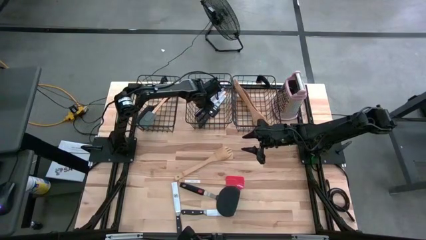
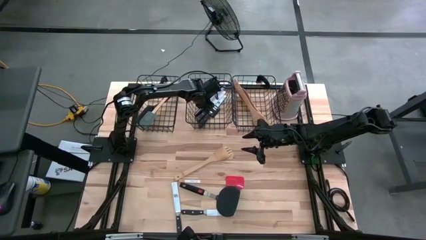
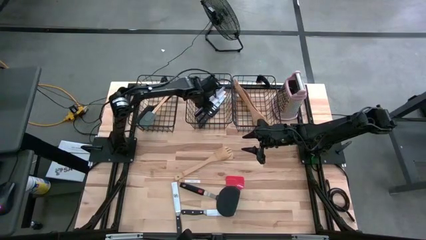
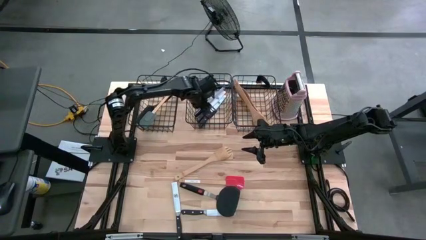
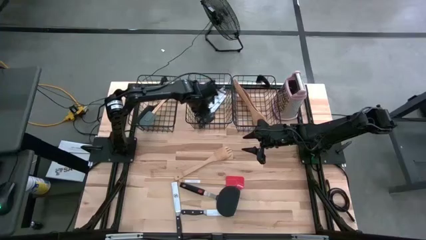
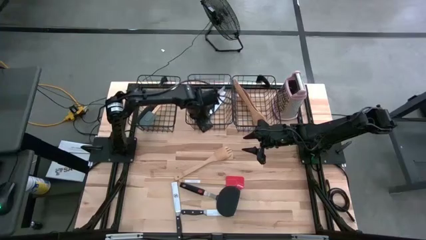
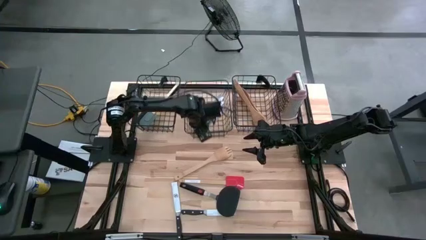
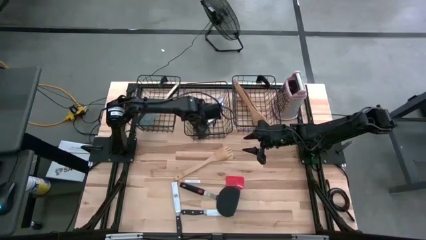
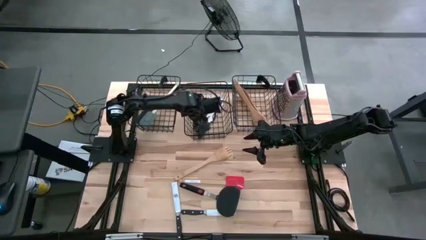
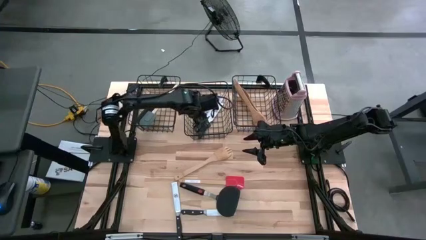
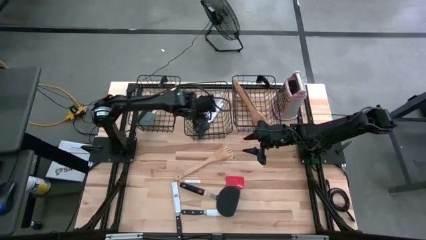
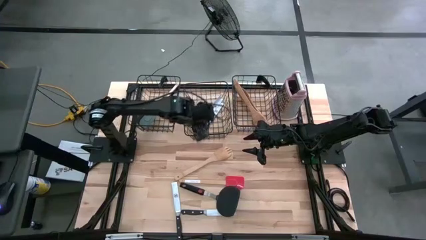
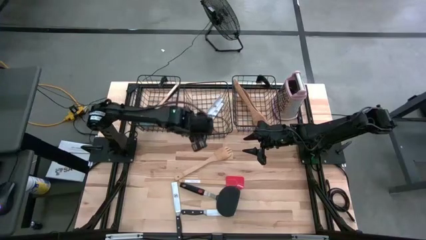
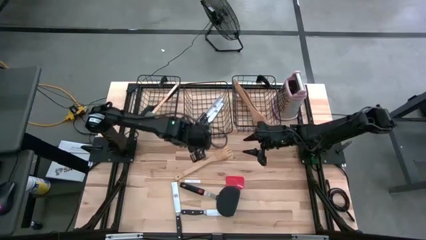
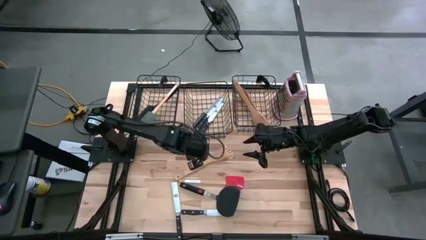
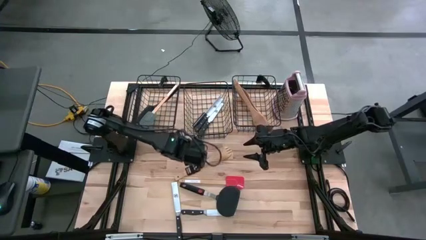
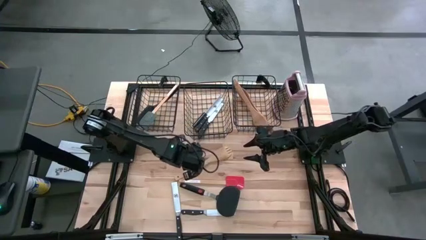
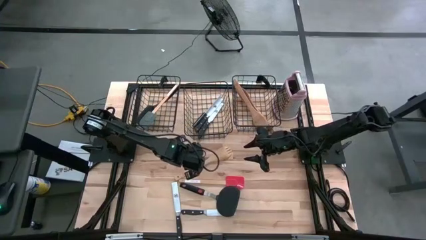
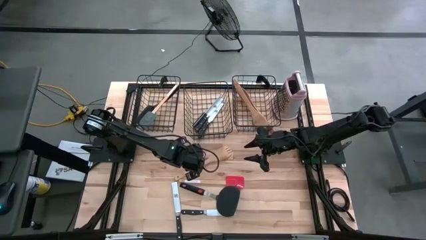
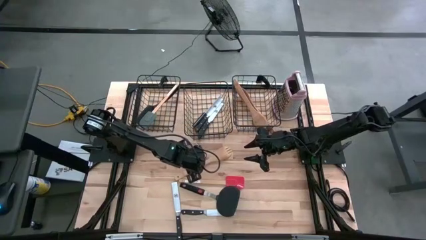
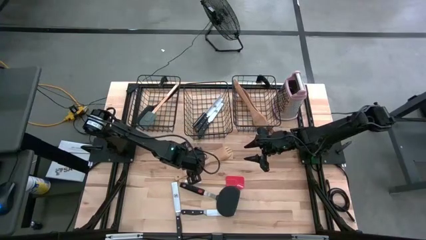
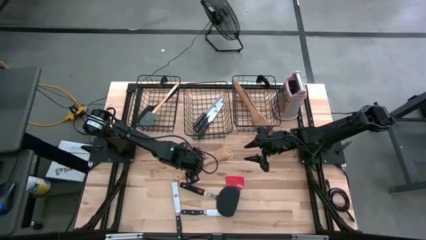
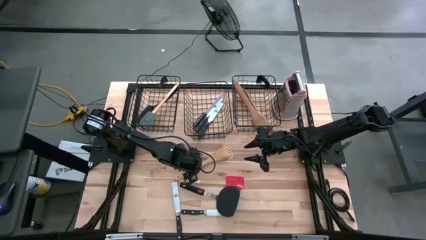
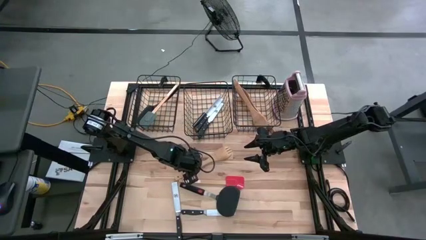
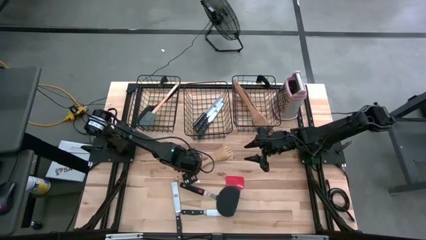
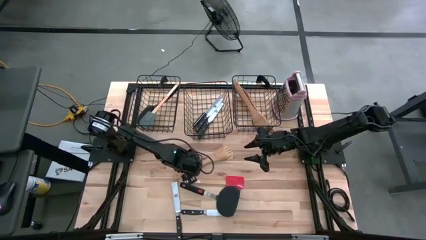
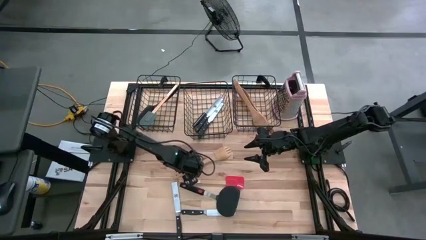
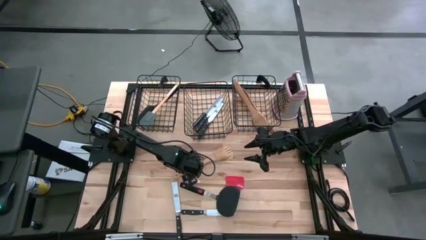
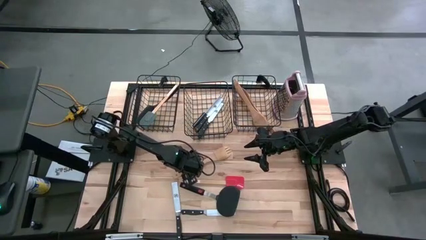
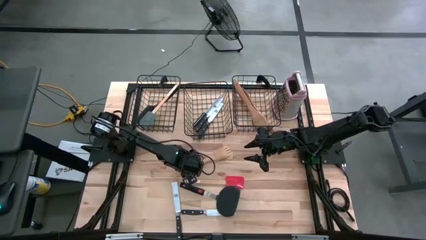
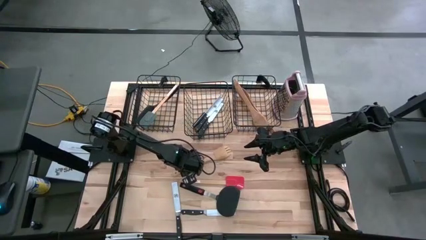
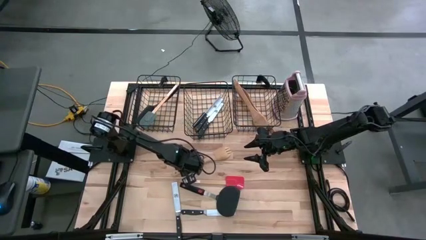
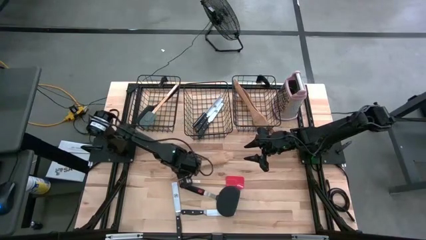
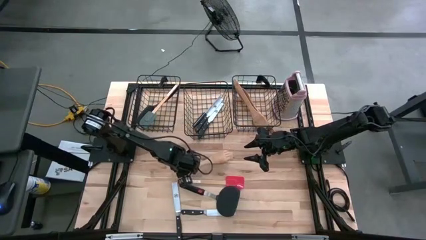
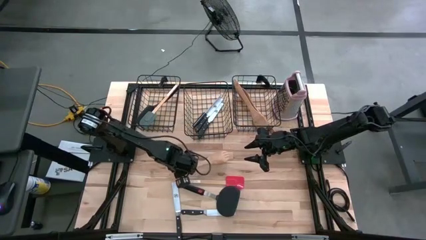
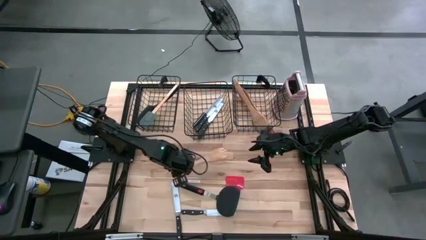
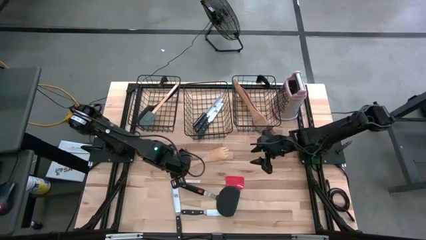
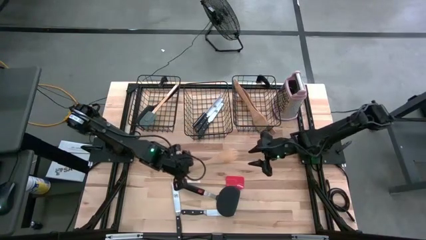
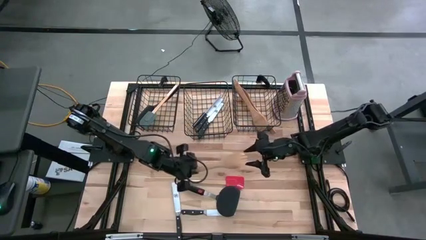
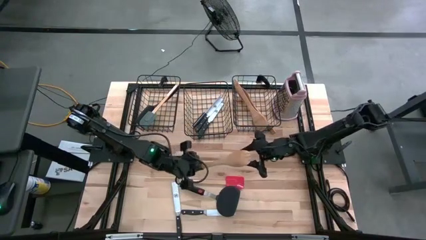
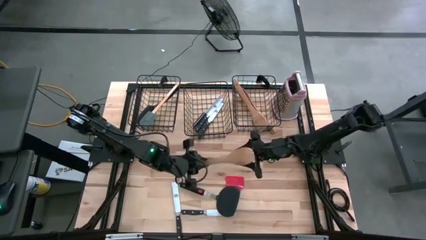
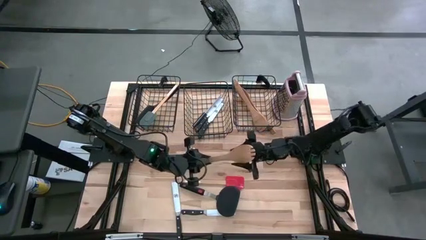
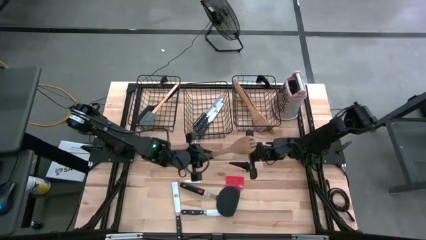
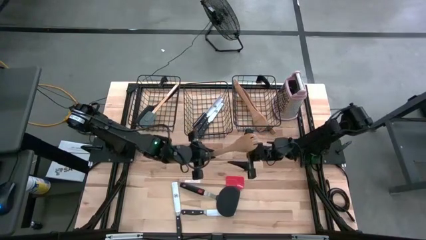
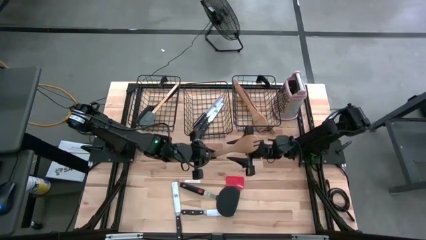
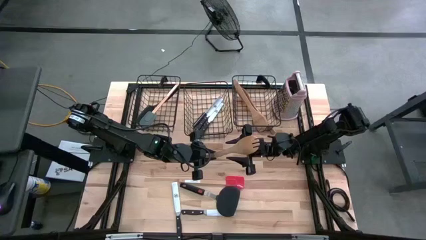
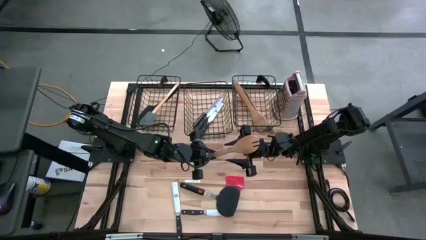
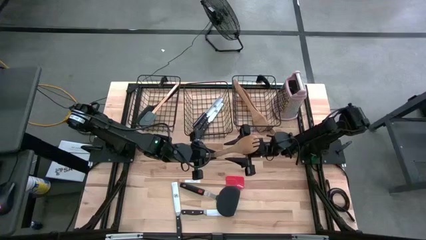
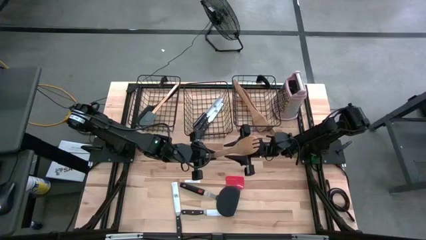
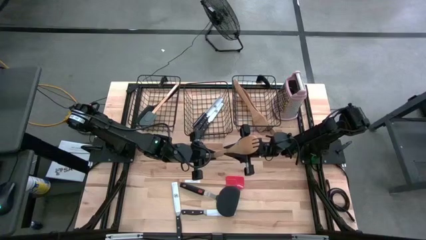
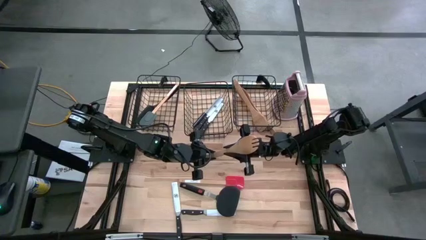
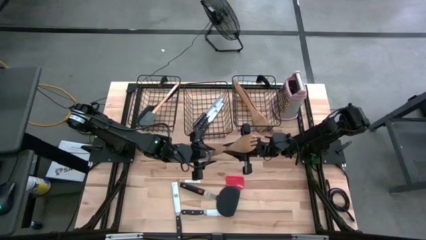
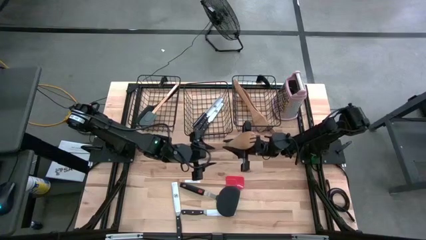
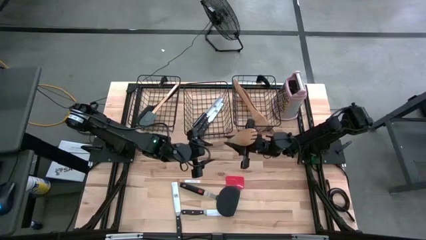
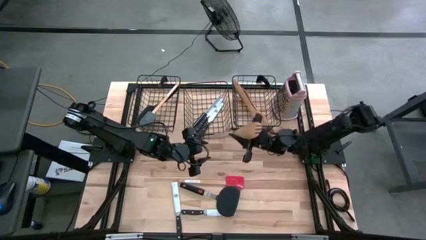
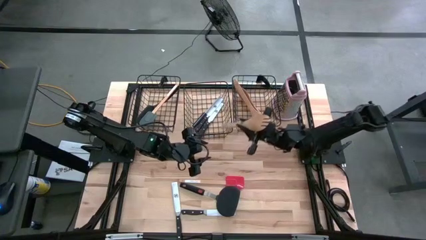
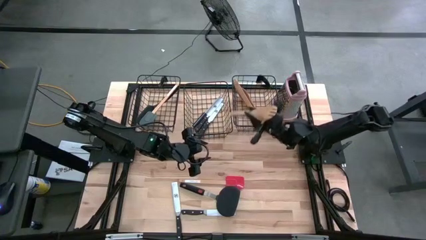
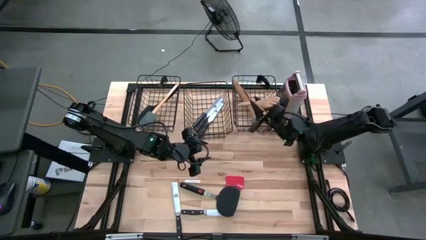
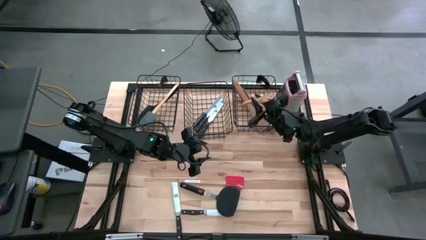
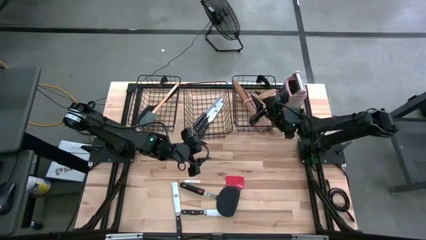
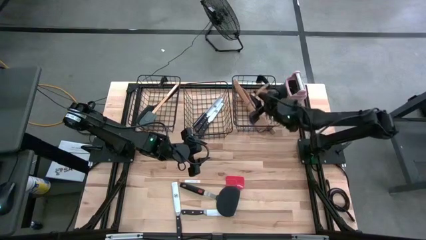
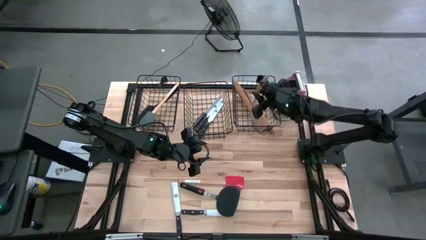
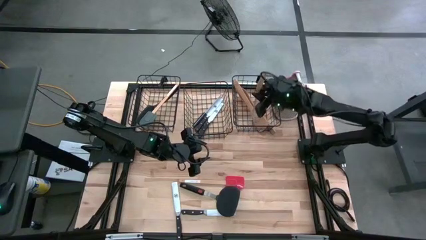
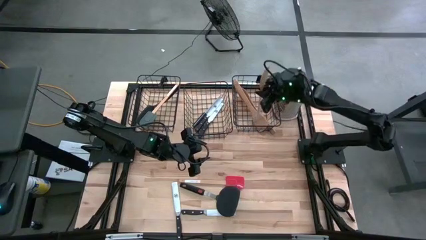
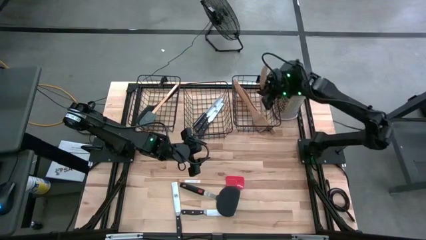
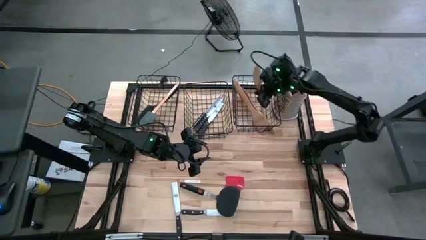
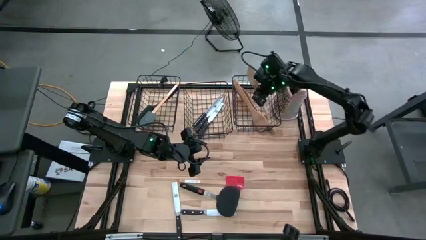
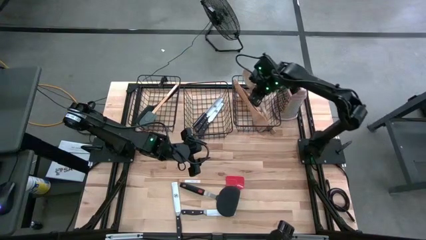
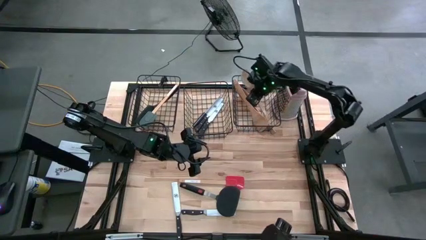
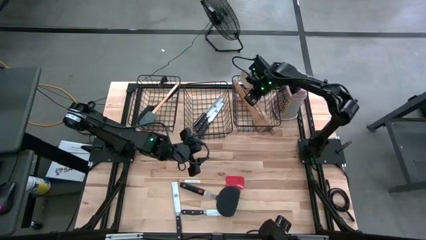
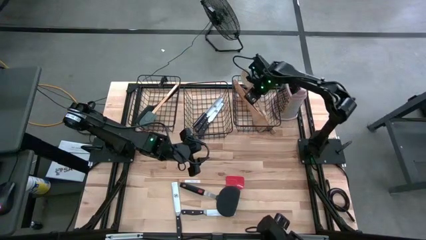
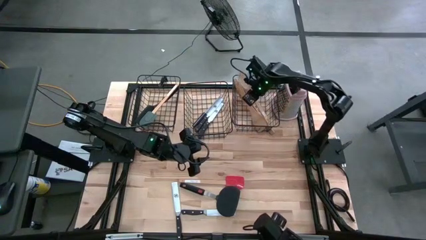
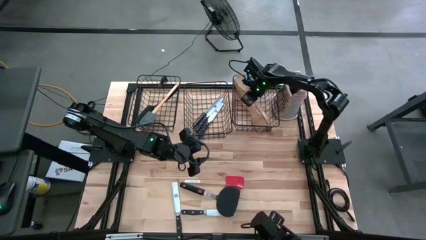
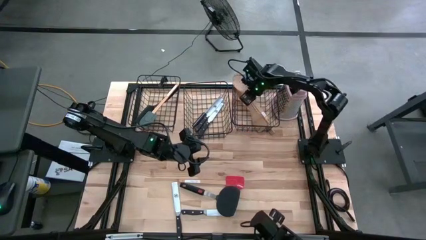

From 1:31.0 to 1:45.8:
Task: Pick & Place Kitchen Items
Put the brown serving spoon into the right black wire basket
